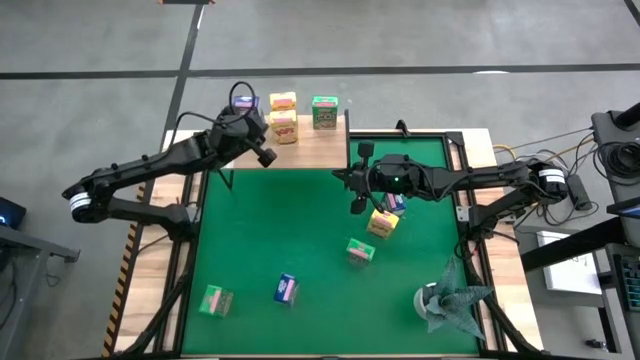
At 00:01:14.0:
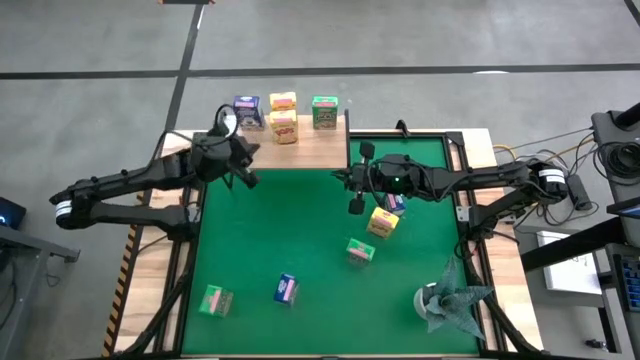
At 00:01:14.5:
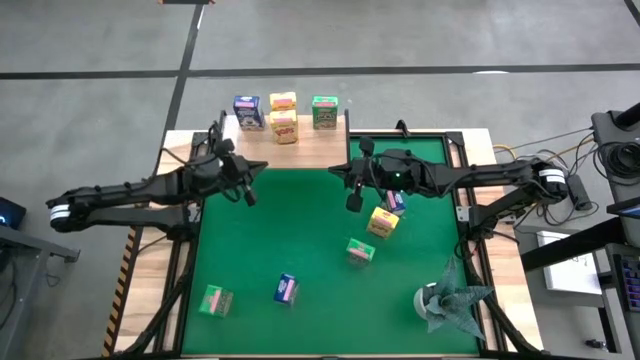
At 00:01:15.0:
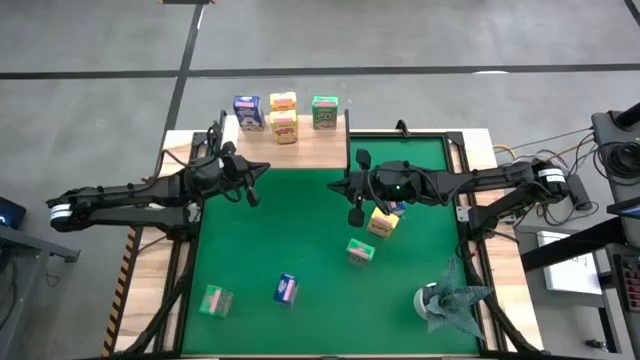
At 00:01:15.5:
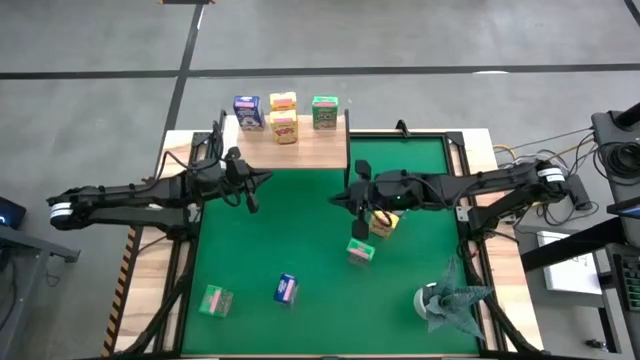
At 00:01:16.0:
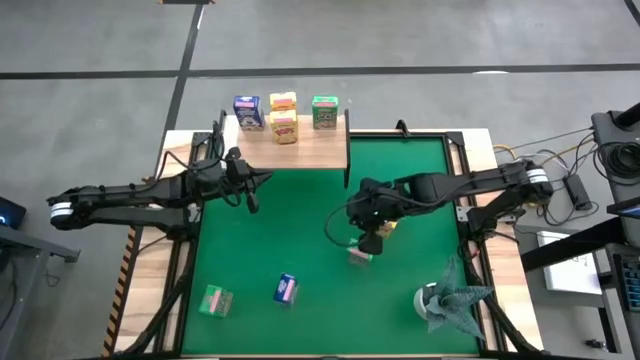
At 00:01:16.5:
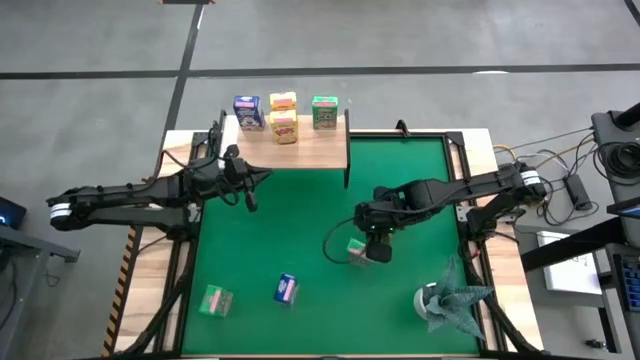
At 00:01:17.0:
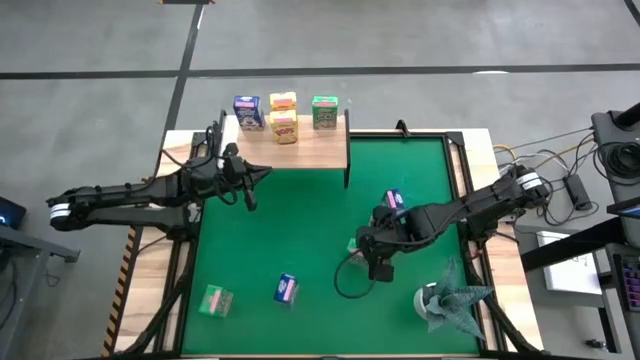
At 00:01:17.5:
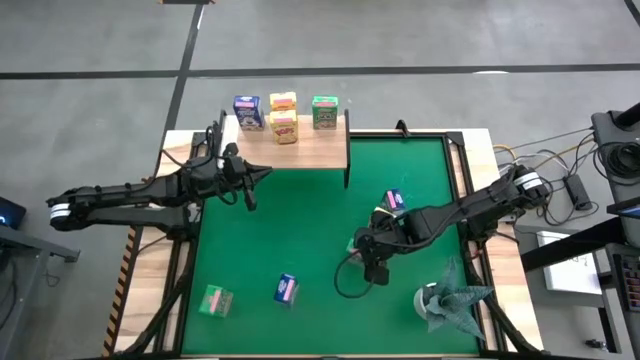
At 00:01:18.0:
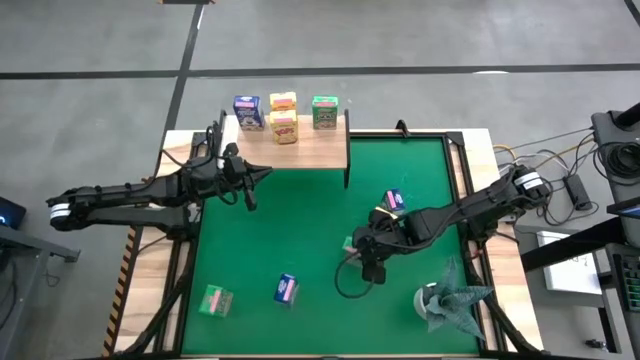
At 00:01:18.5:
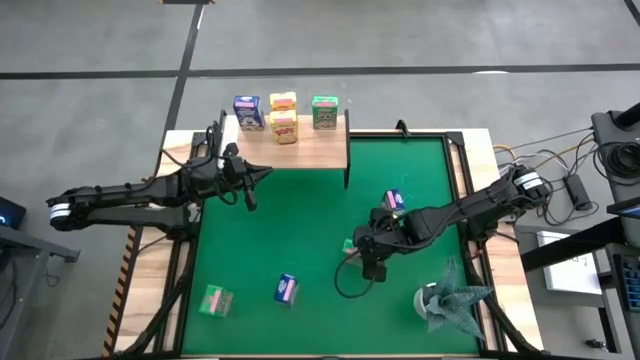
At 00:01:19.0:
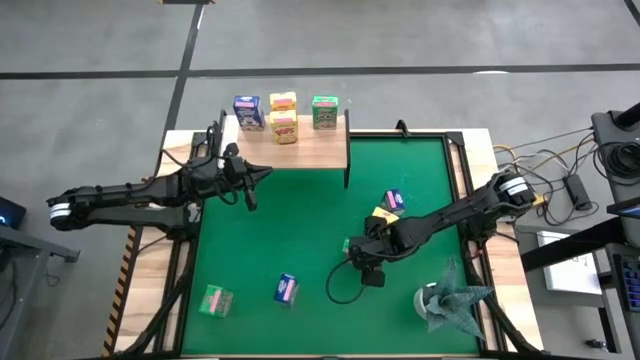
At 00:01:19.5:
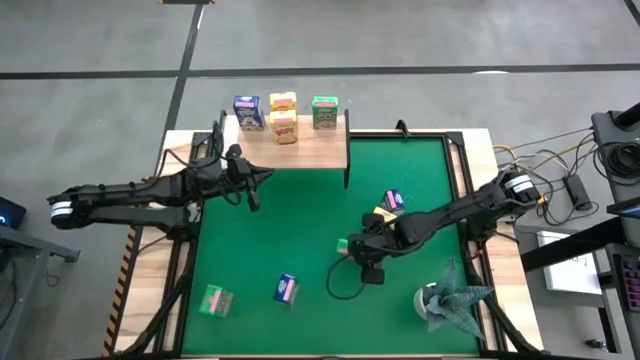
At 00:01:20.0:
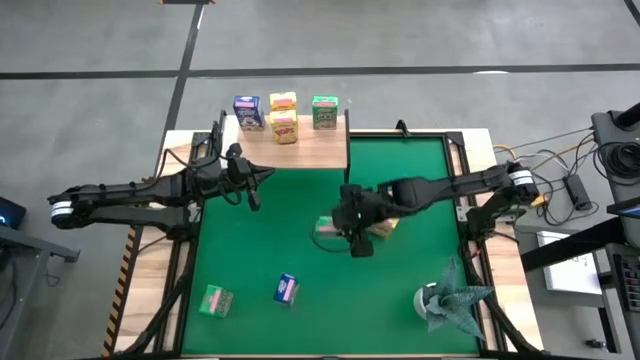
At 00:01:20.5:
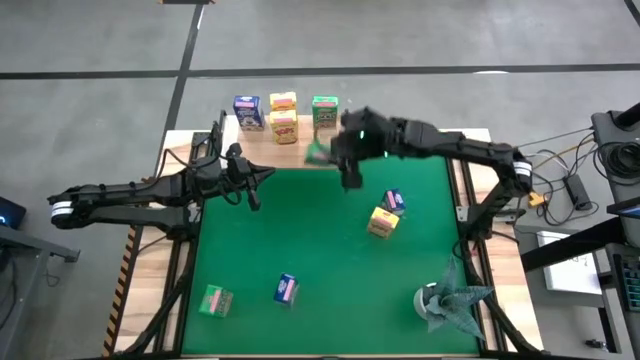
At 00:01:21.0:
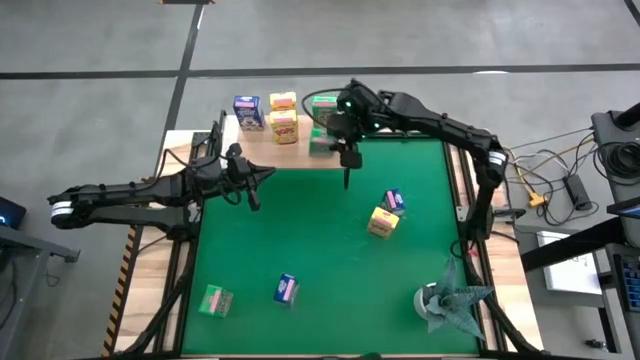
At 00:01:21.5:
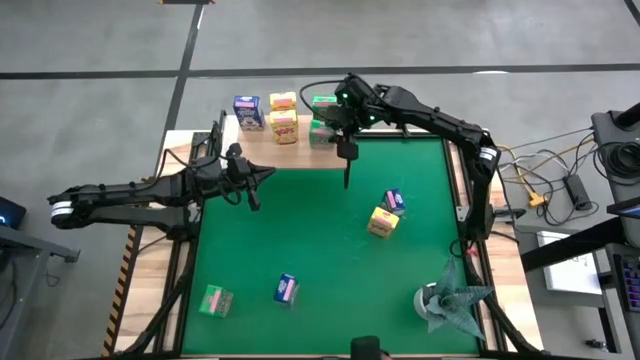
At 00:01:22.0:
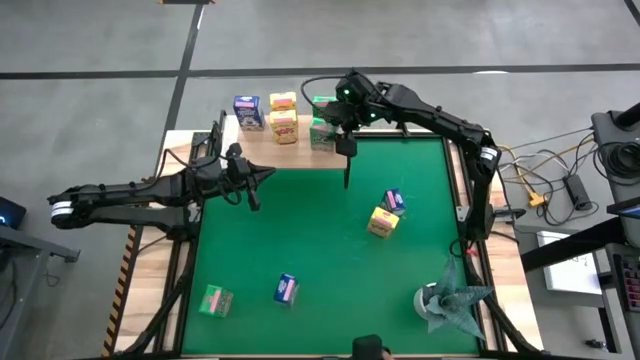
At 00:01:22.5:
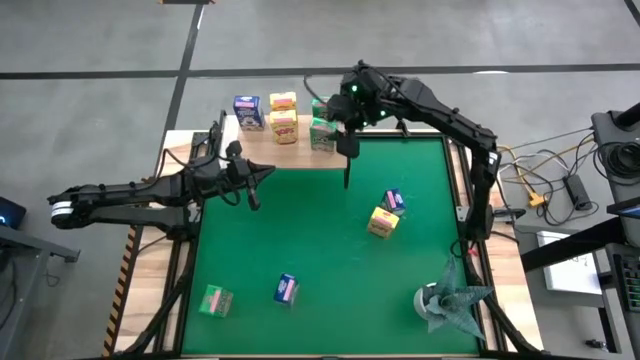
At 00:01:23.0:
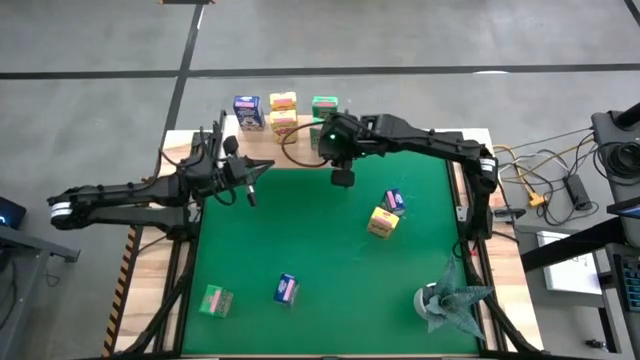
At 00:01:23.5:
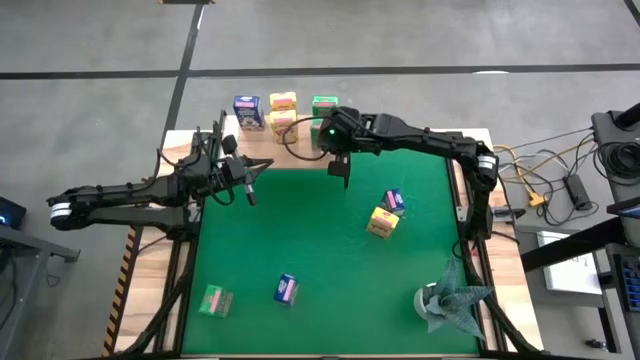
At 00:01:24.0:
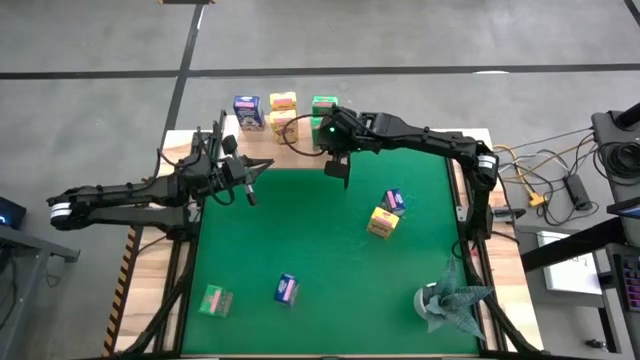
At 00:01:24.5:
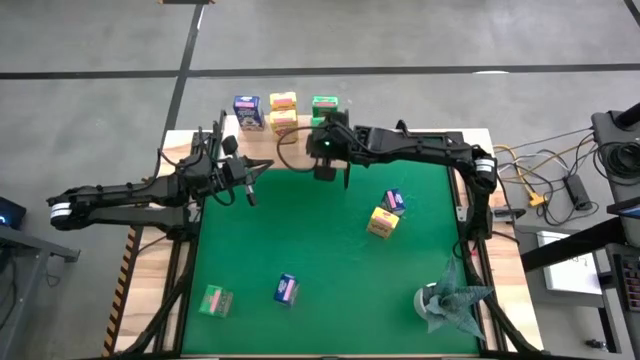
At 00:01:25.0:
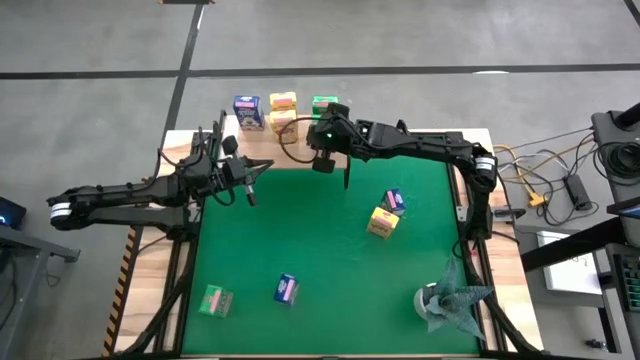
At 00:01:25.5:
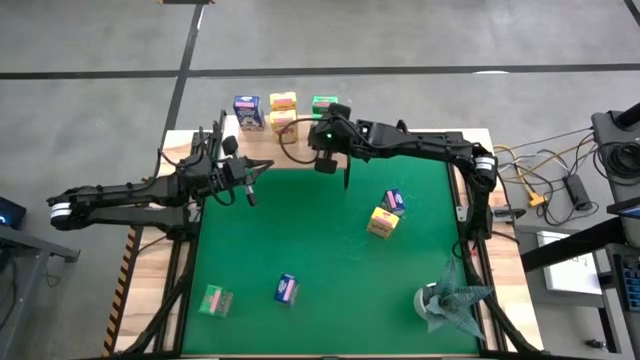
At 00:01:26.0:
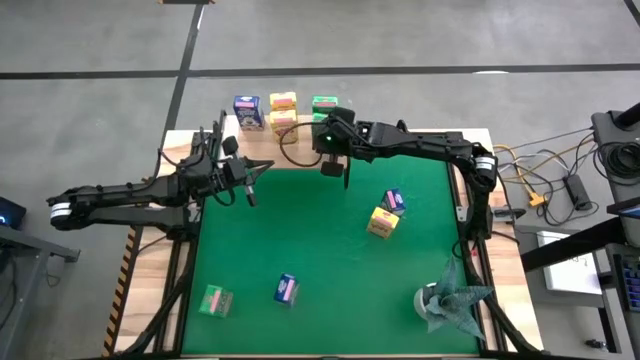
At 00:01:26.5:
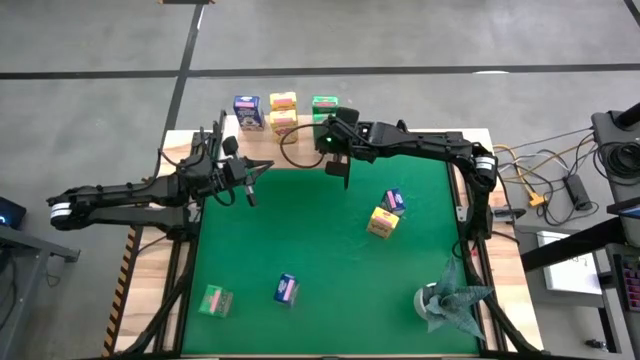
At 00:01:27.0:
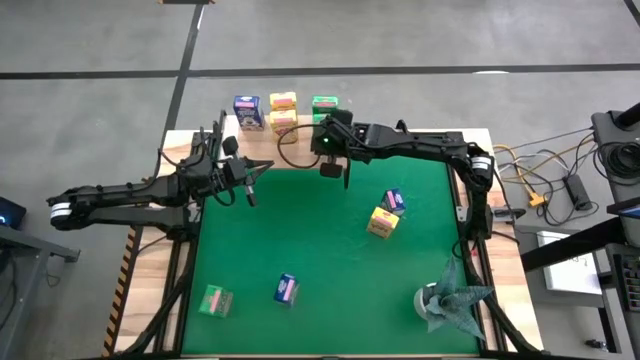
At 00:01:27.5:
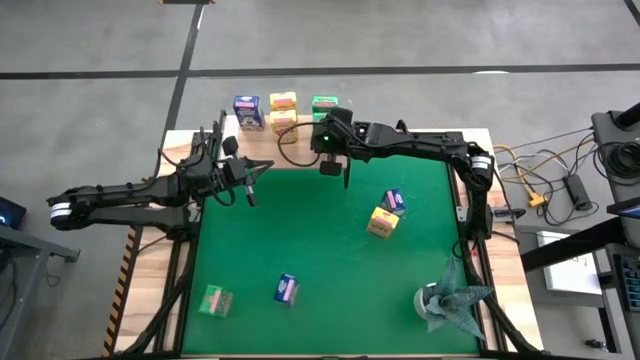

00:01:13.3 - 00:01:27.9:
Task: Stack cereal on shelf
Put the top green cereal box on the shelf aligned with the other green cereal box

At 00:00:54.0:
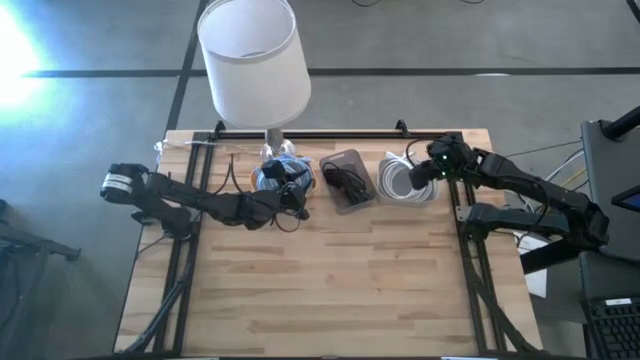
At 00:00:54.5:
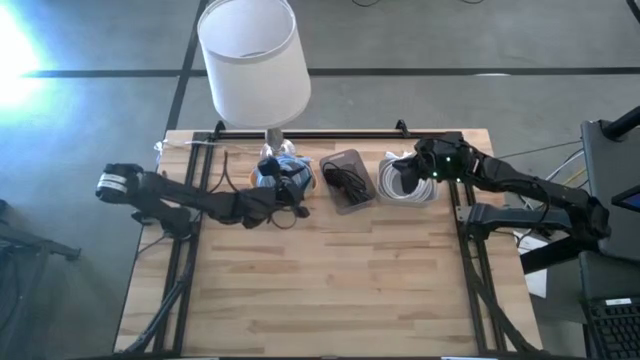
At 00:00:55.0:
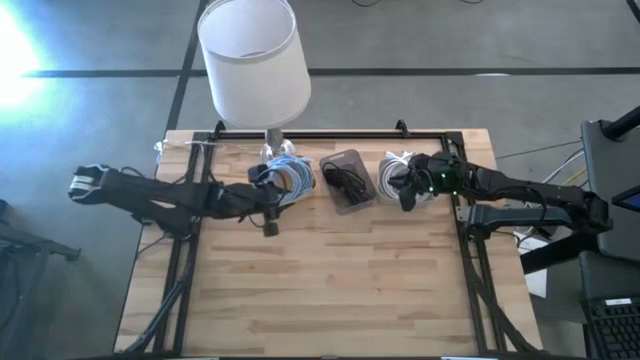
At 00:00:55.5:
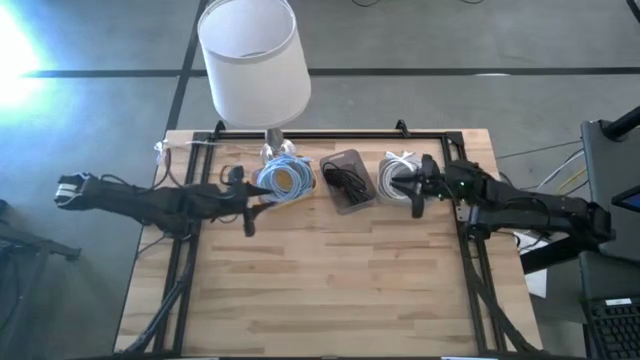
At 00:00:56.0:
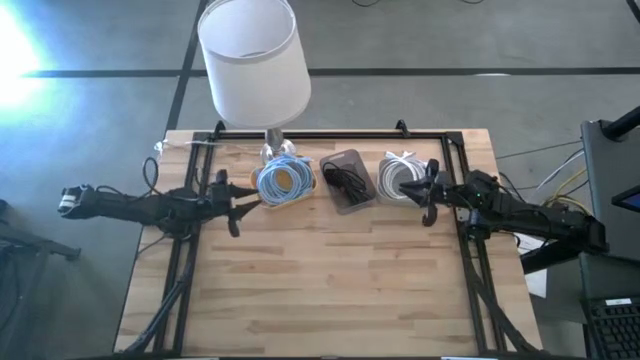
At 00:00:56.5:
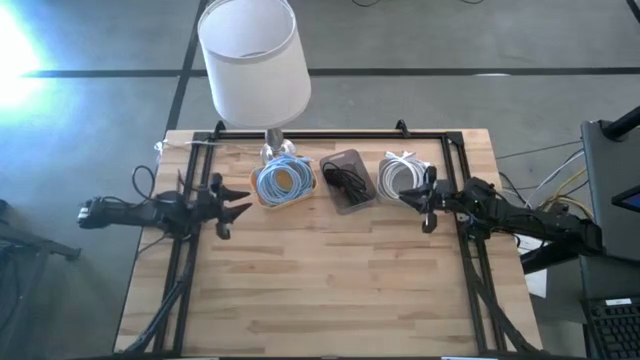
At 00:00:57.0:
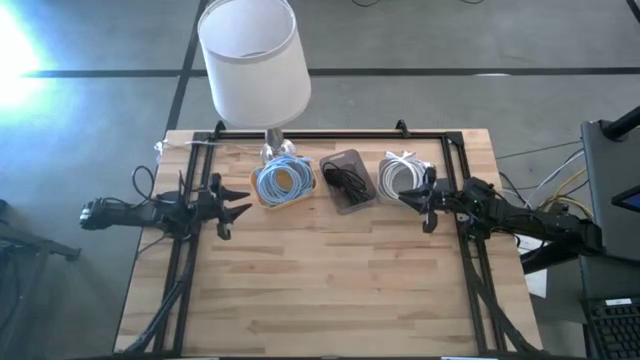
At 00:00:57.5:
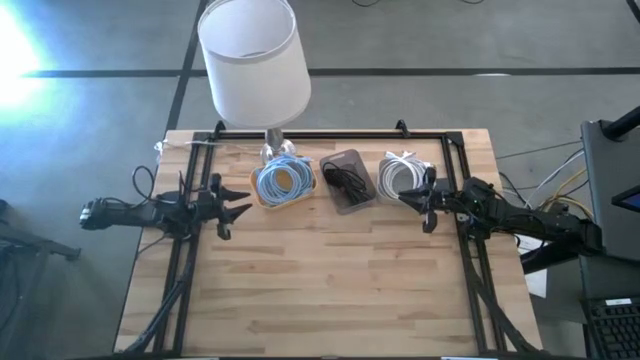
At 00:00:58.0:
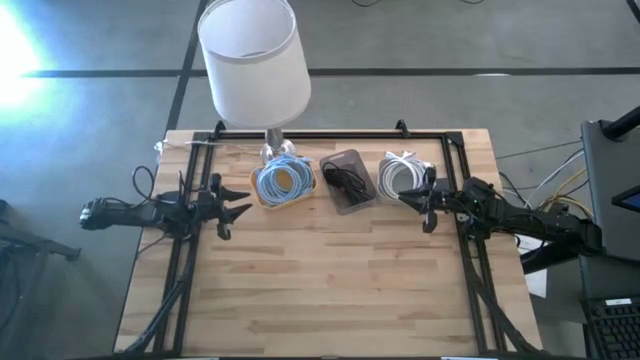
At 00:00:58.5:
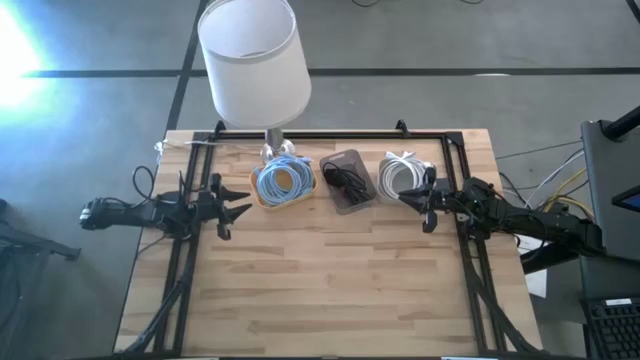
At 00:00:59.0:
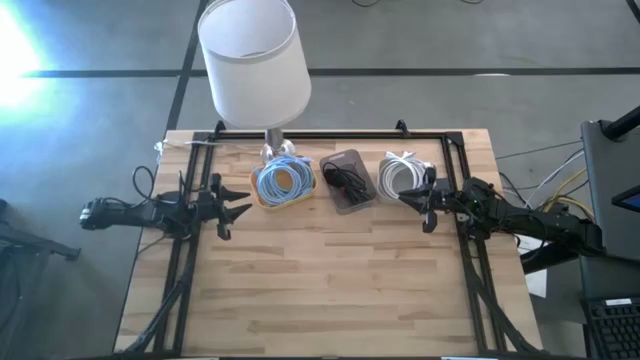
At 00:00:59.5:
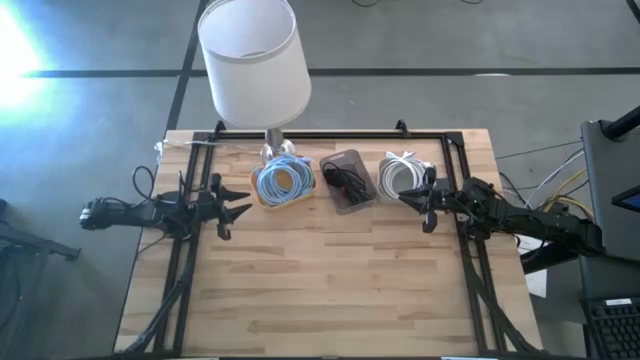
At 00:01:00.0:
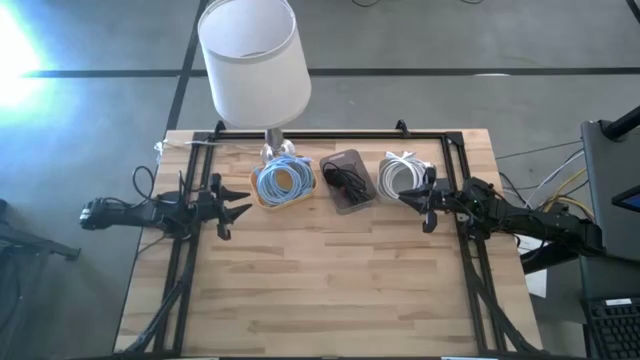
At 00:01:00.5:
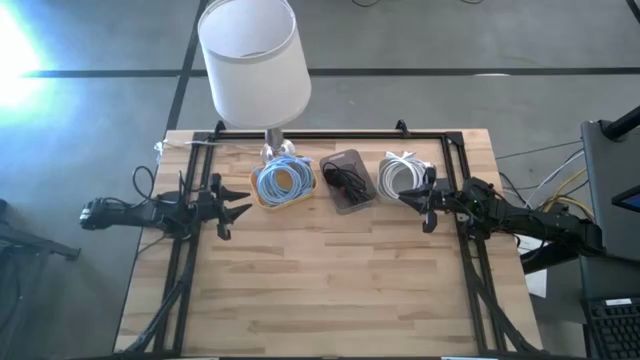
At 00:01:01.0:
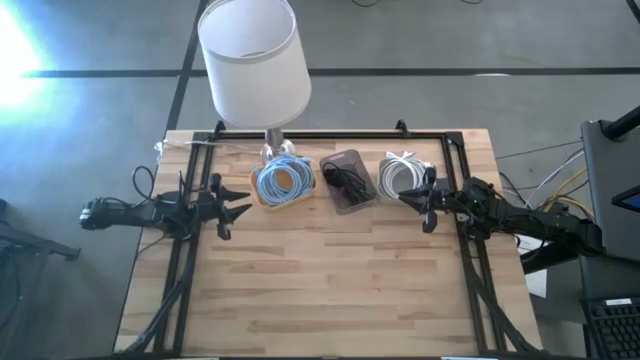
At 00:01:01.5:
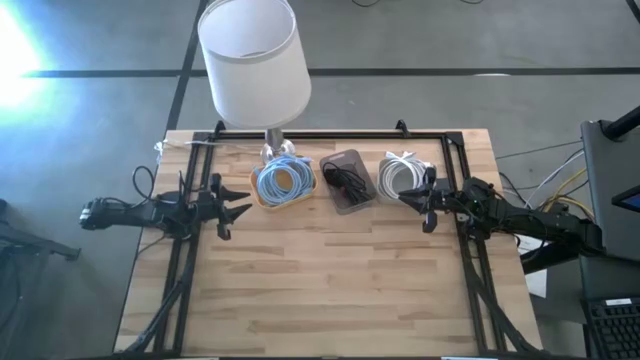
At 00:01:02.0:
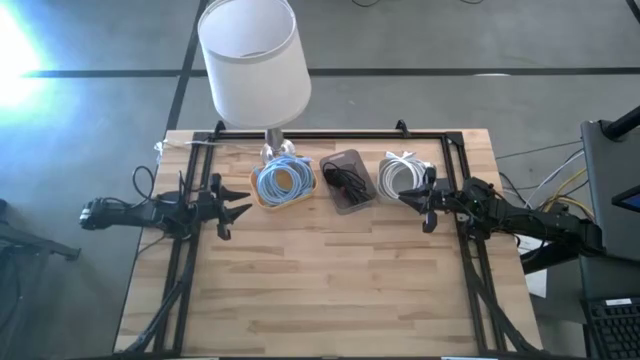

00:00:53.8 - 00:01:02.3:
Task: Pick & Place USB Port
Return to Home Position
